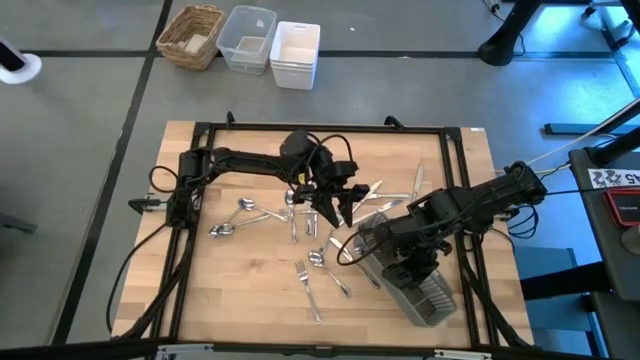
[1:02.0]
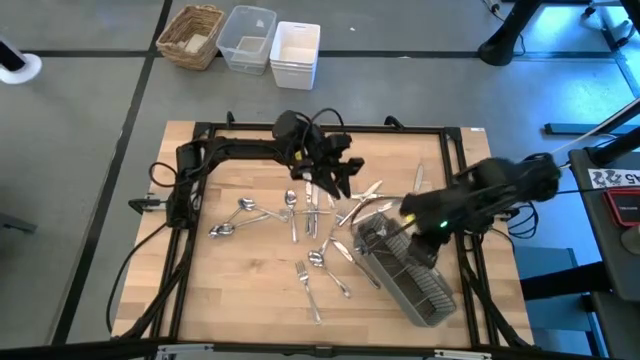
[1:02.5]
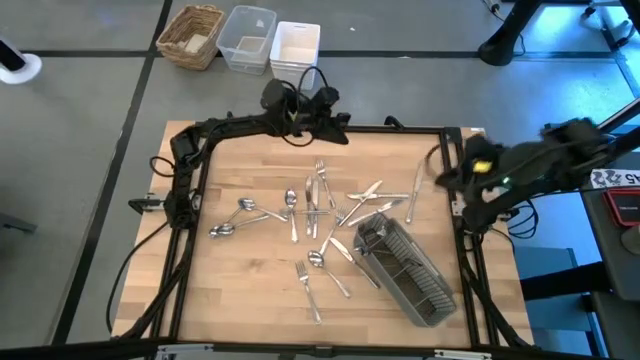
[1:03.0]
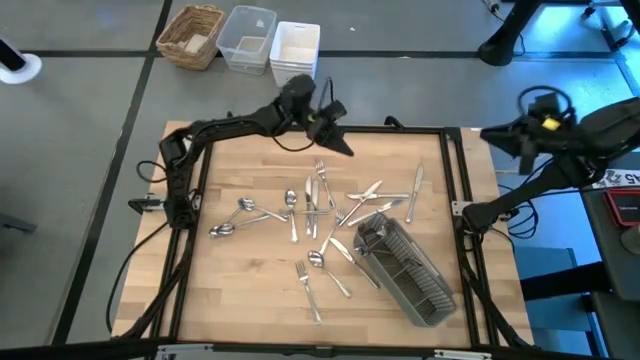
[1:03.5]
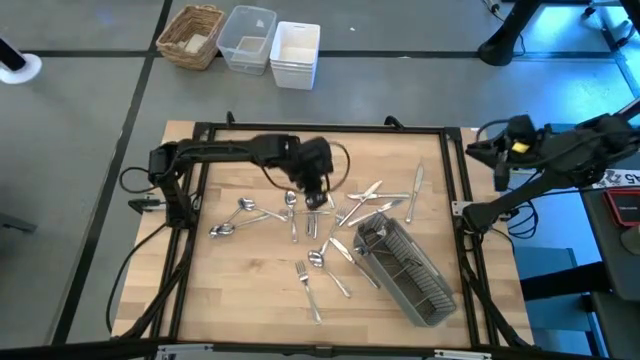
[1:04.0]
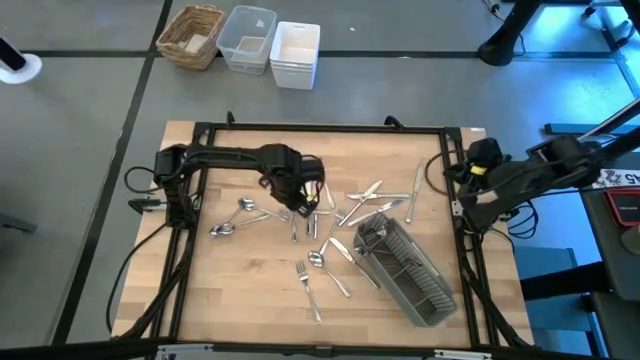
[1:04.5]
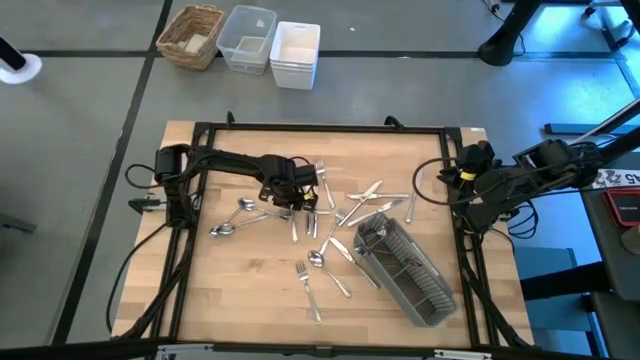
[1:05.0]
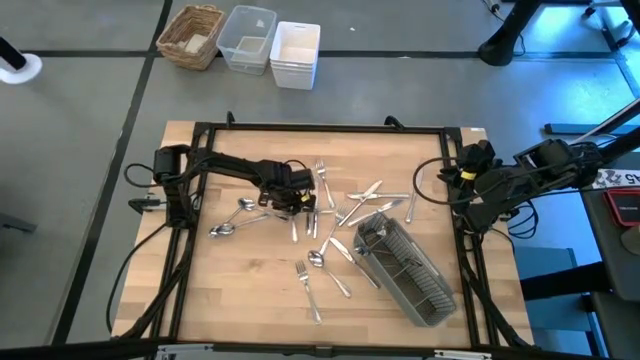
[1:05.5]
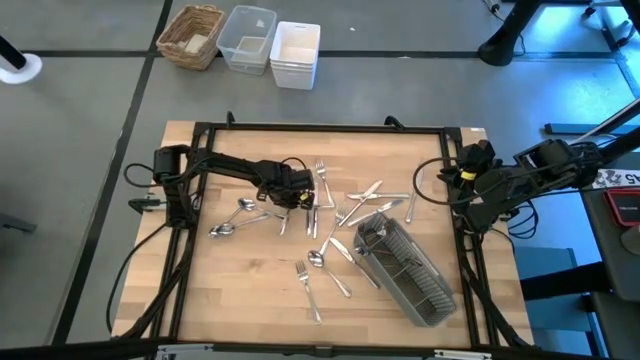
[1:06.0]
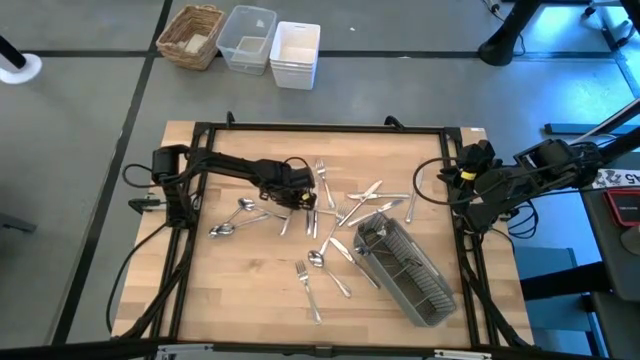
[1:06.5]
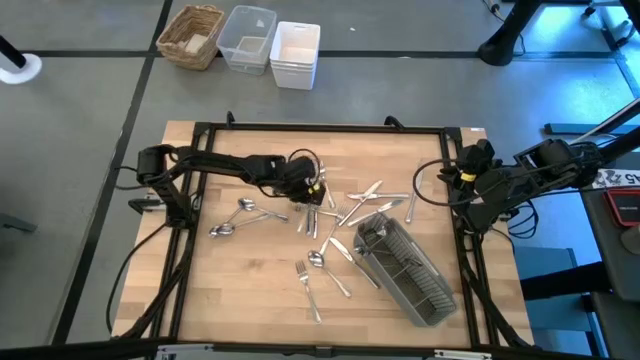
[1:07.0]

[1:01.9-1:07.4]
Task: Sort silverware
Put the silver spoon into the gray silverware basket

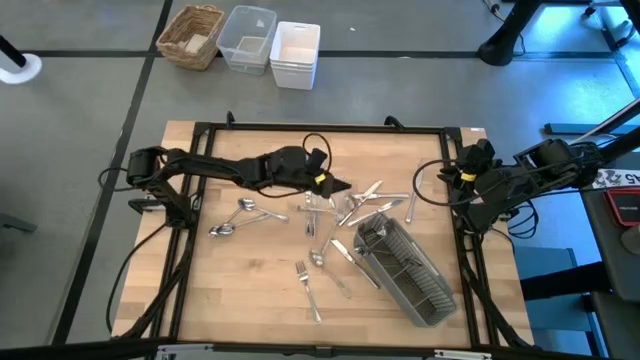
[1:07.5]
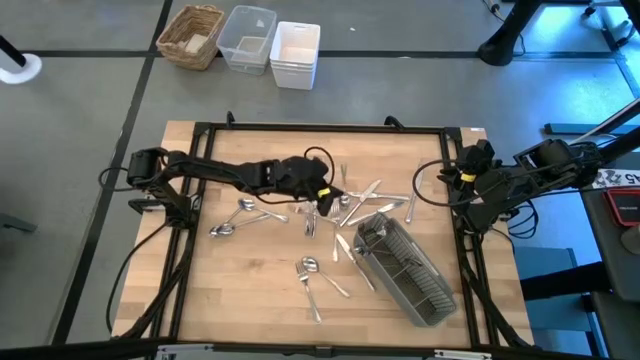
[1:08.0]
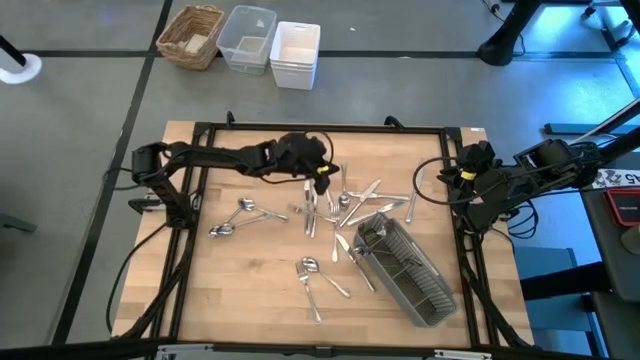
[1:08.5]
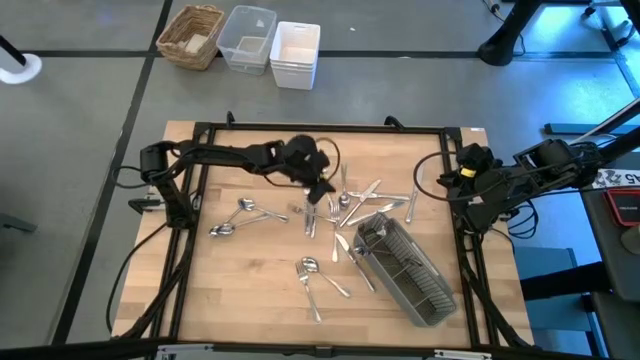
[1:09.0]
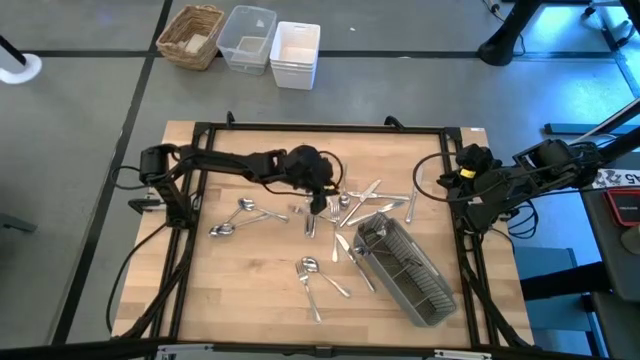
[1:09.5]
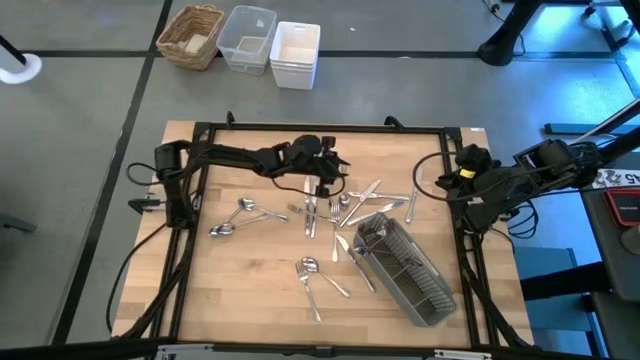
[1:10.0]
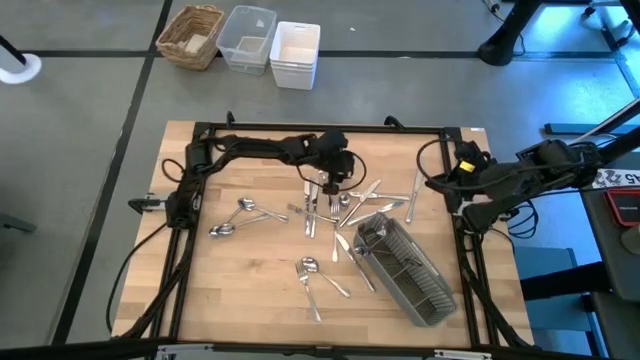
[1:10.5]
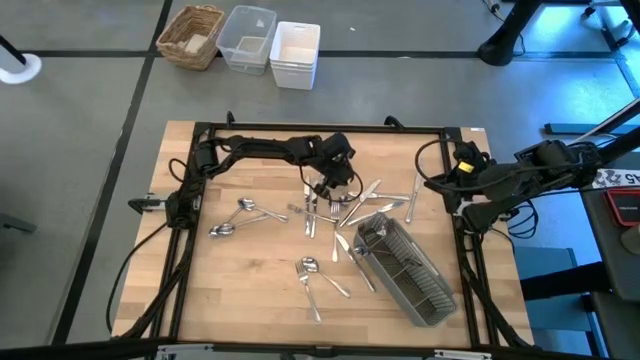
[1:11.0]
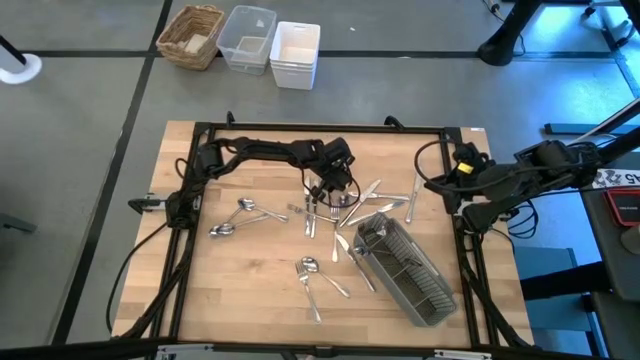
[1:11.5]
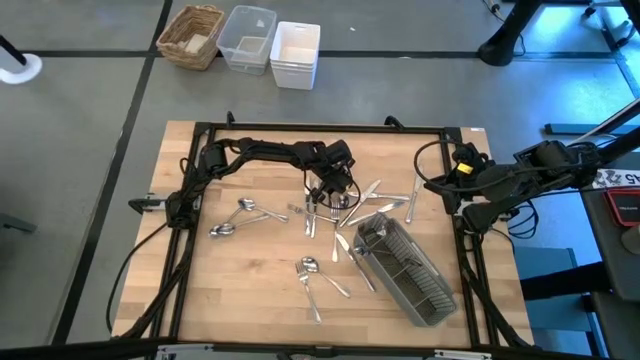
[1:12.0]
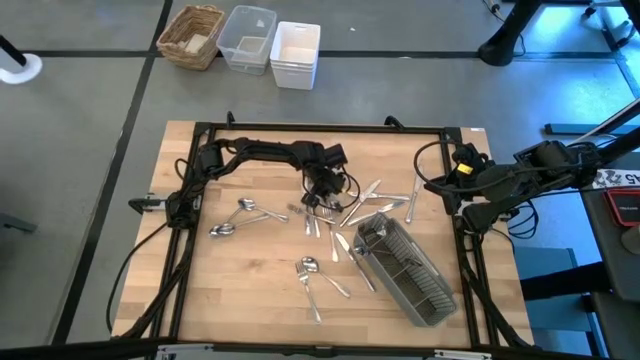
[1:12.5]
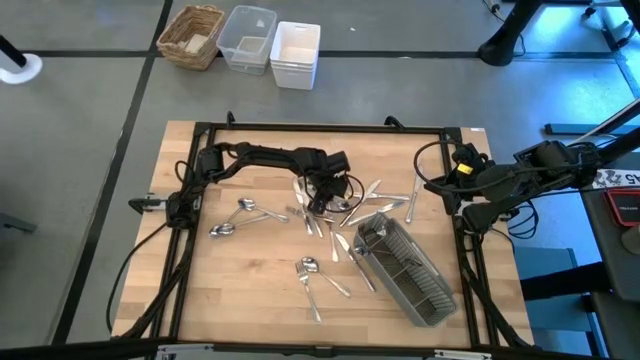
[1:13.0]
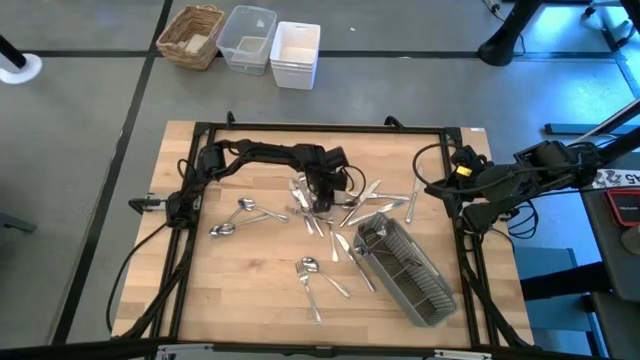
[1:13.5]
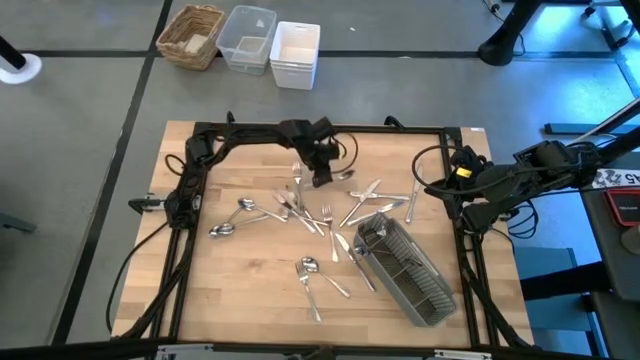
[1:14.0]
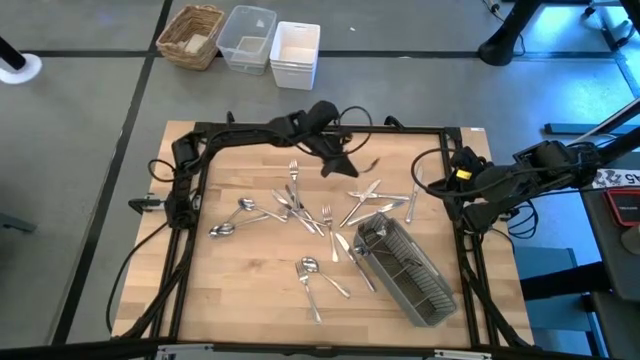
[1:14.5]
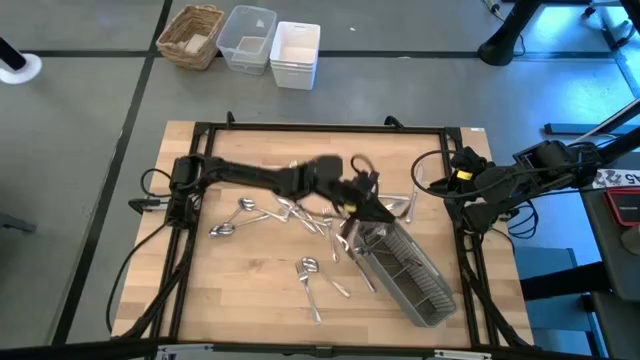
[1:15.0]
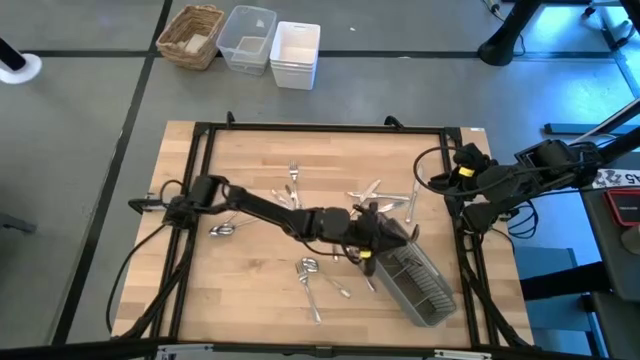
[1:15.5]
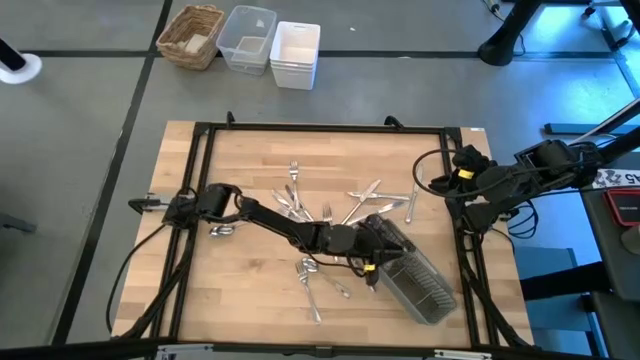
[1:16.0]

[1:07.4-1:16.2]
Put the silver spoon into the gray silverware basket

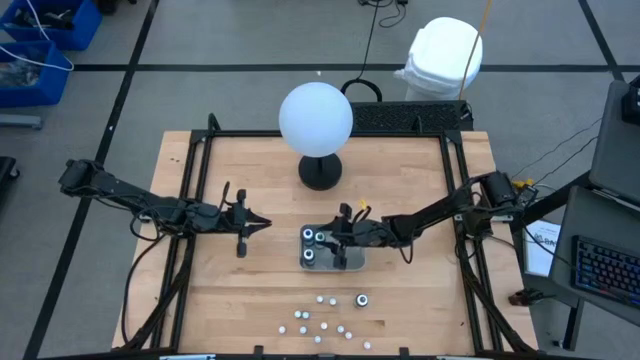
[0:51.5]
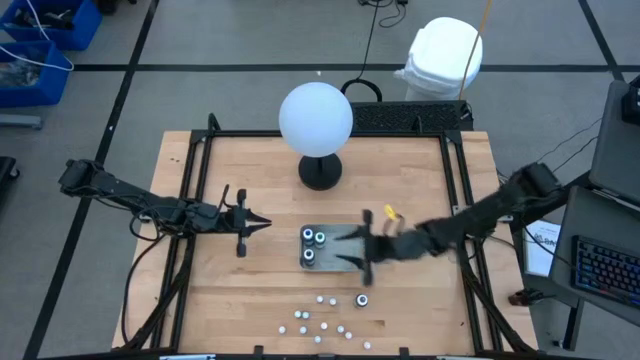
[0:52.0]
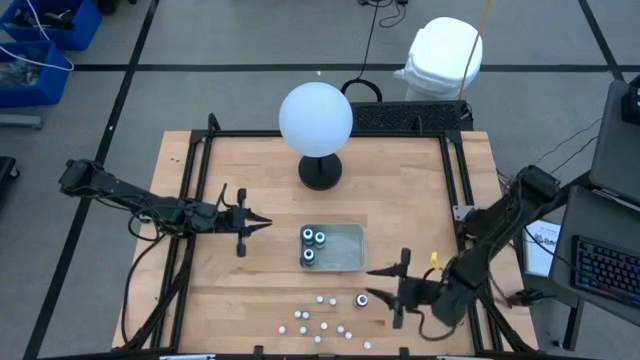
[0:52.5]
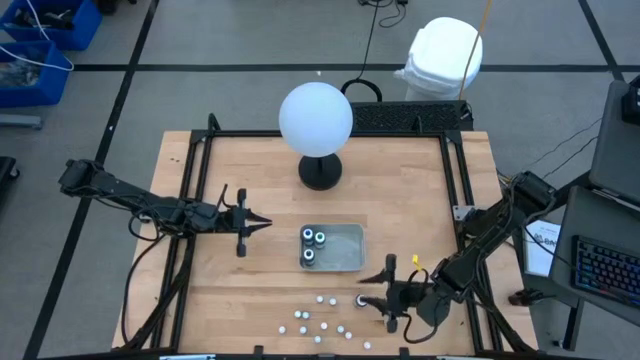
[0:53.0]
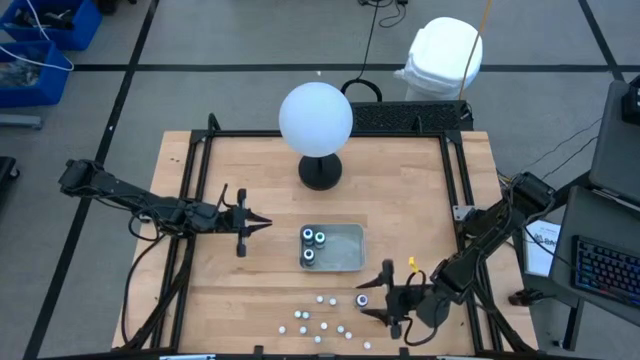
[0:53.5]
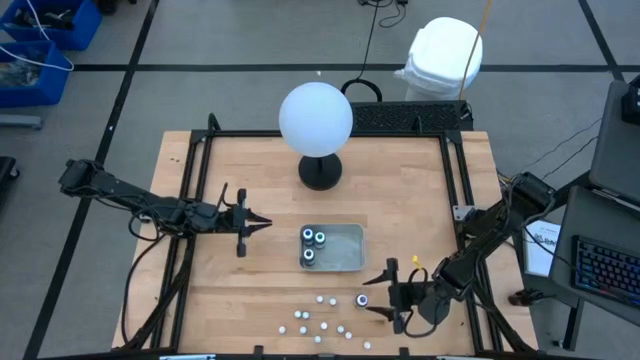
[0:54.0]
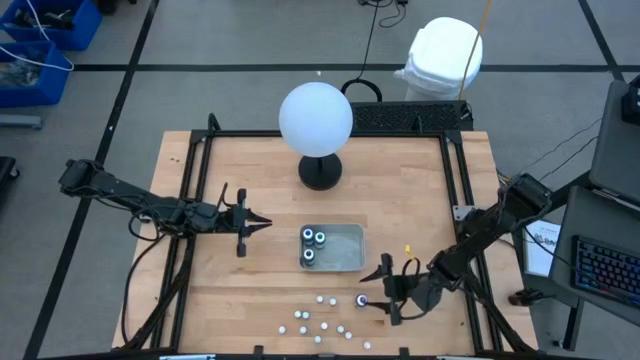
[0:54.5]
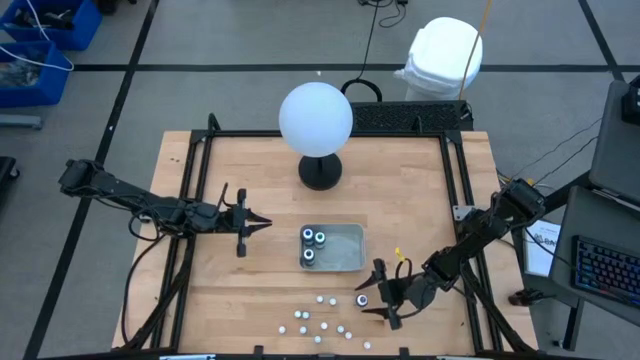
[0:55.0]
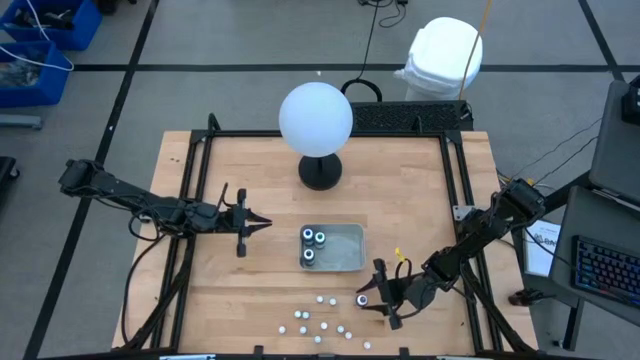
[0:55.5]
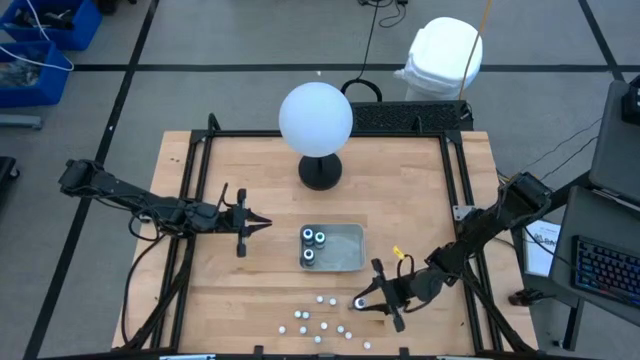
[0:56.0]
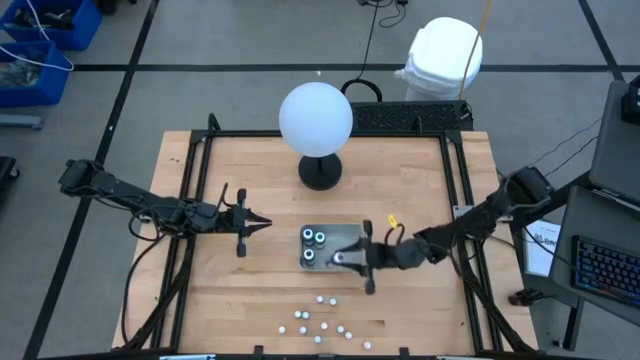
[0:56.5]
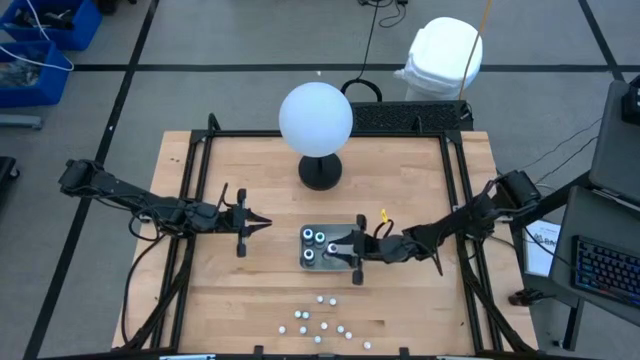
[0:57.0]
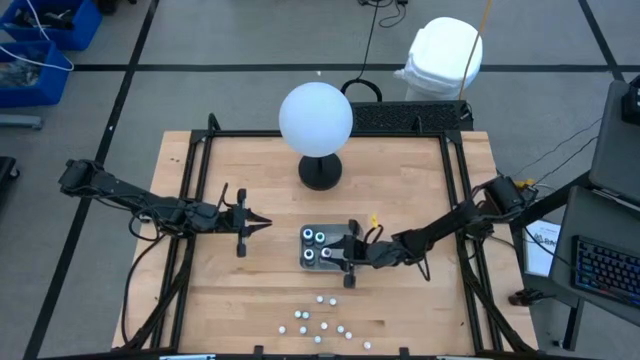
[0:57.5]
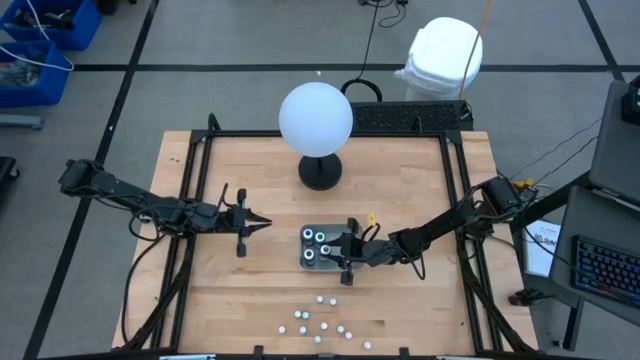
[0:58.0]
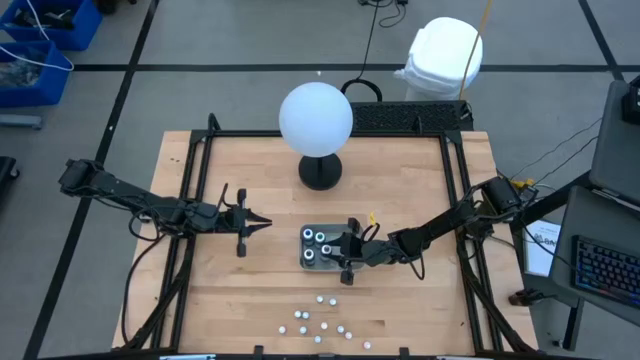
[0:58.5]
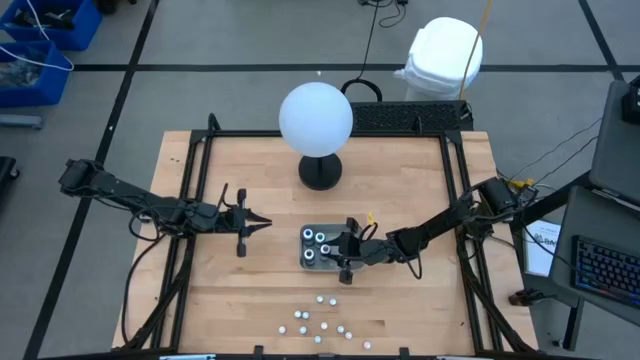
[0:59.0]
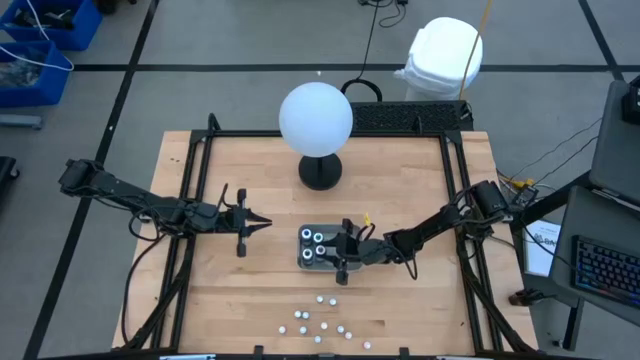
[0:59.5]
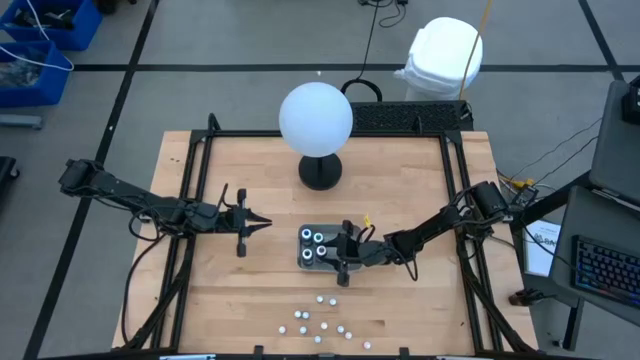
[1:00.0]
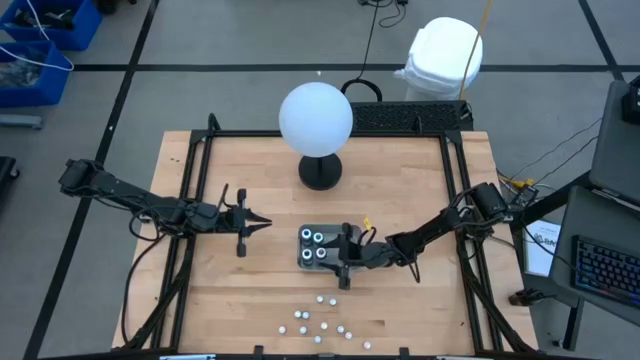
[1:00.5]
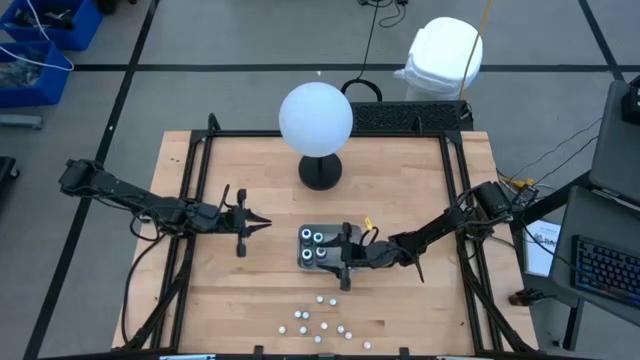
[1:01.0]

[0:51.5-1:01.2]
Task: Pick & Place food coloring
Put the large violet food coloring bottle into the gray bin
